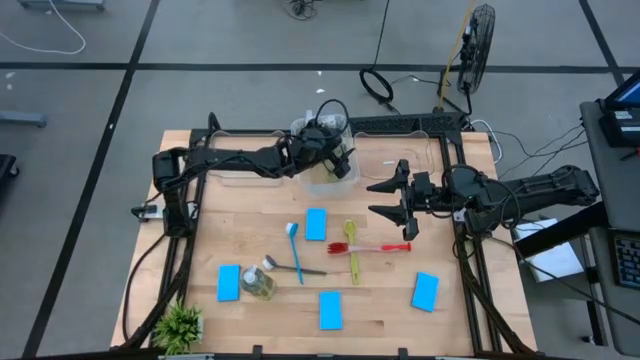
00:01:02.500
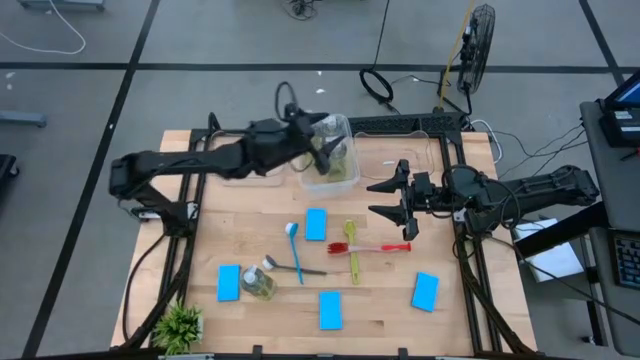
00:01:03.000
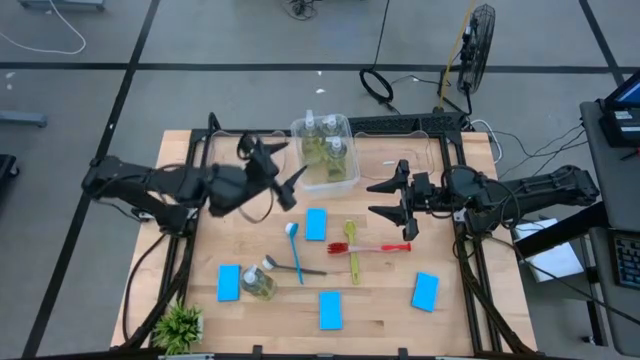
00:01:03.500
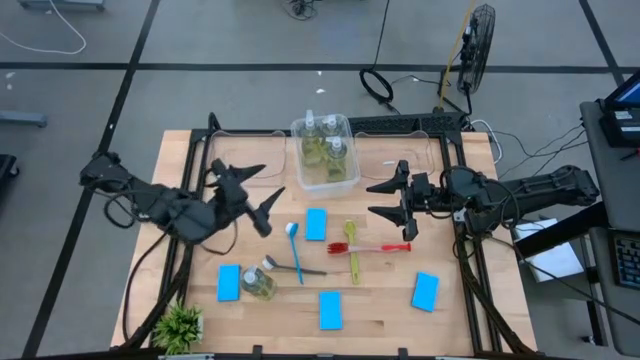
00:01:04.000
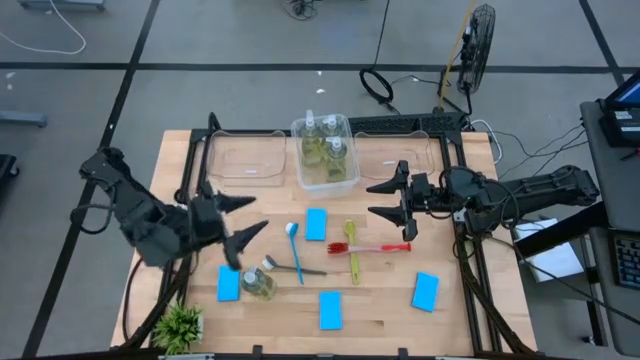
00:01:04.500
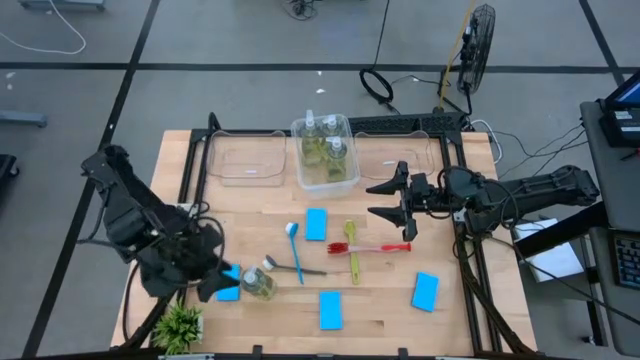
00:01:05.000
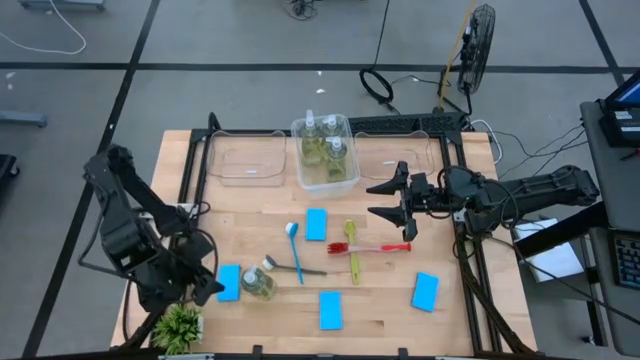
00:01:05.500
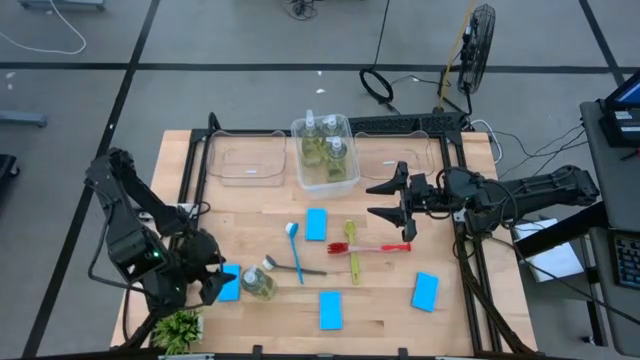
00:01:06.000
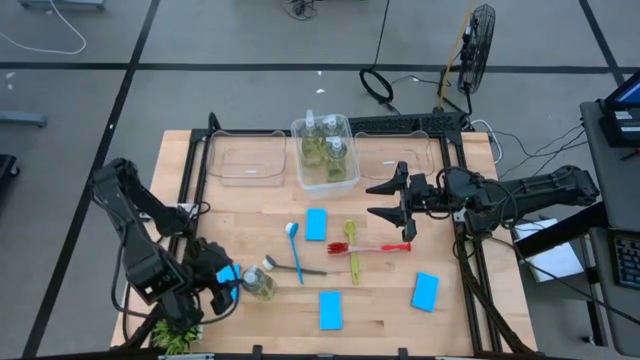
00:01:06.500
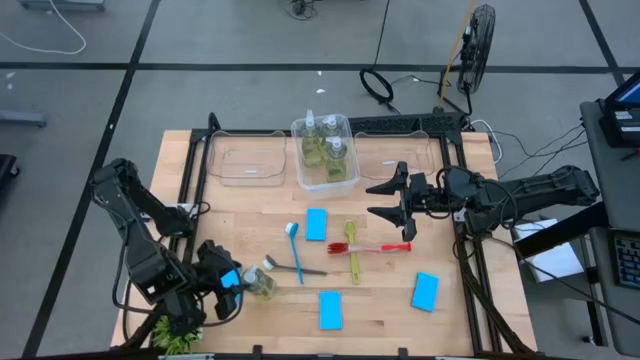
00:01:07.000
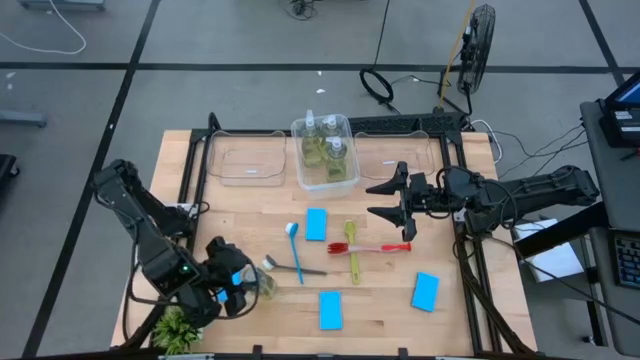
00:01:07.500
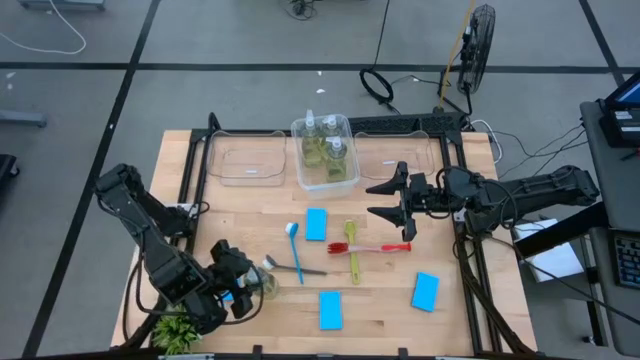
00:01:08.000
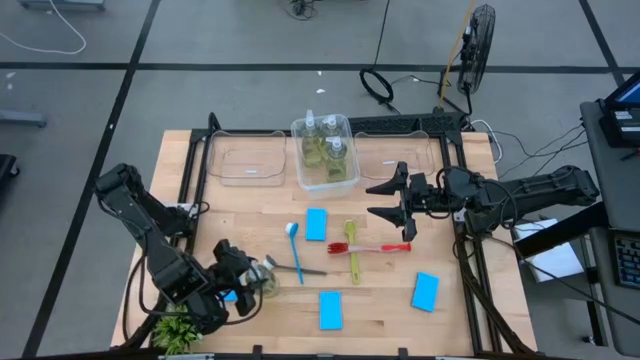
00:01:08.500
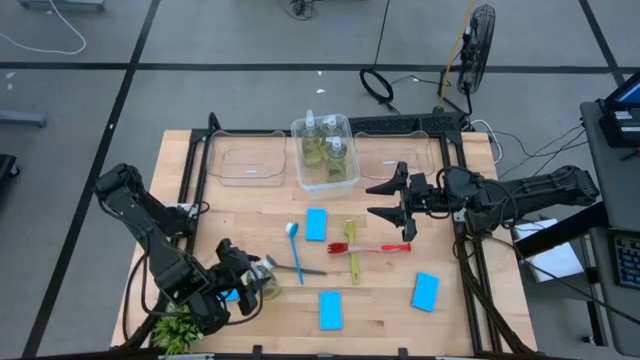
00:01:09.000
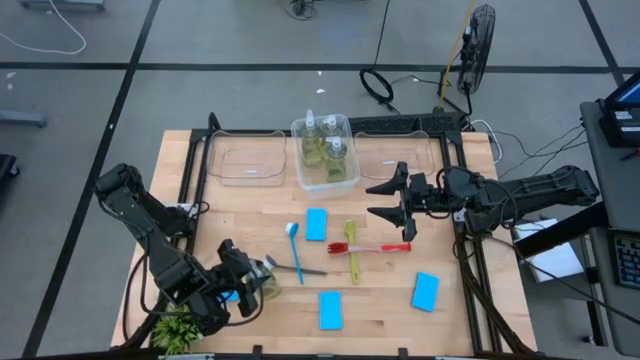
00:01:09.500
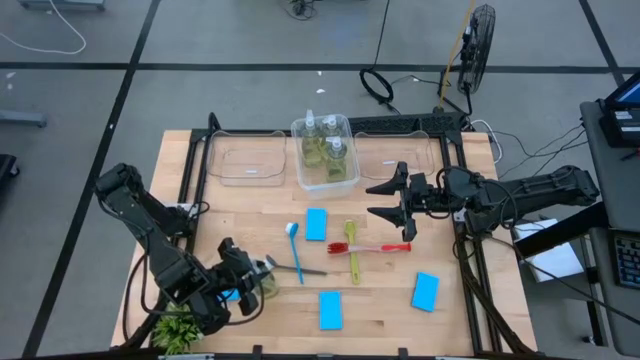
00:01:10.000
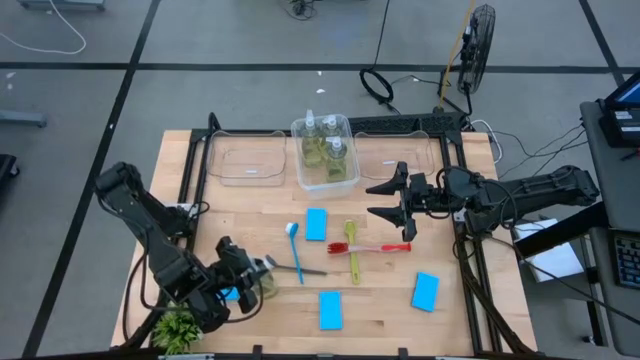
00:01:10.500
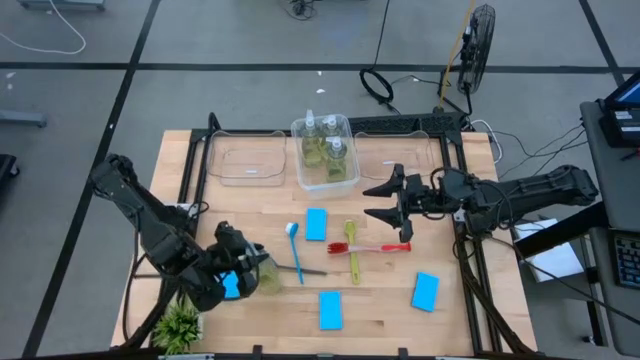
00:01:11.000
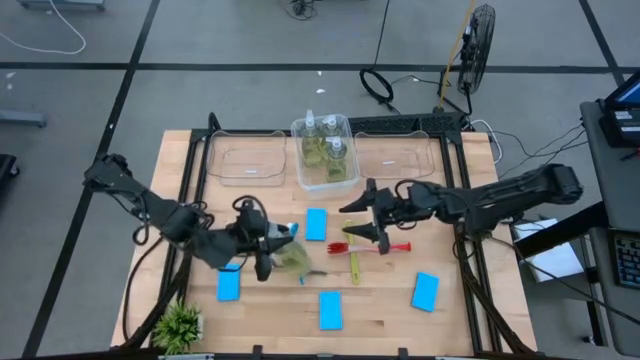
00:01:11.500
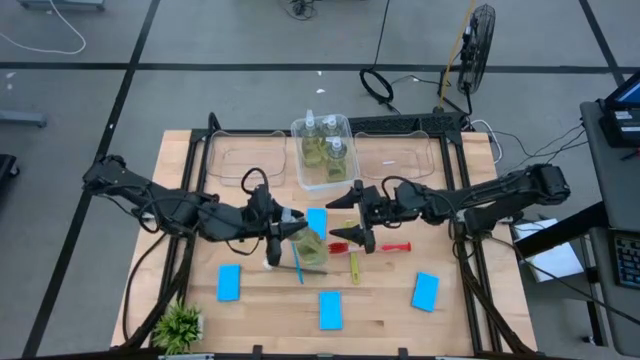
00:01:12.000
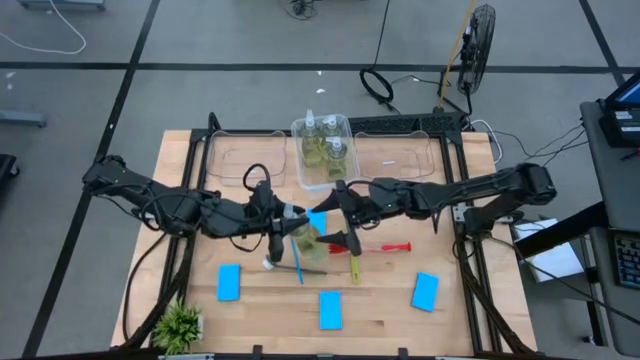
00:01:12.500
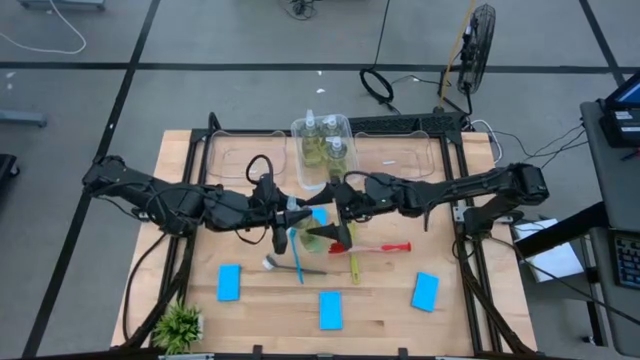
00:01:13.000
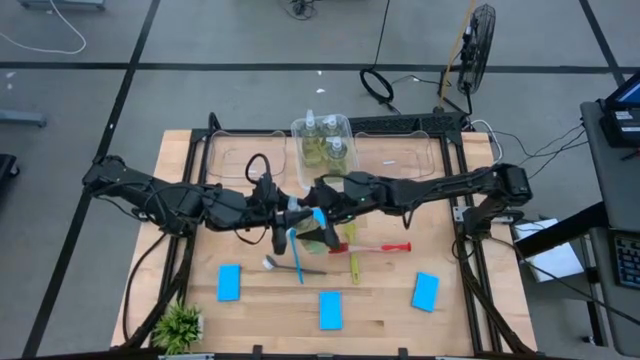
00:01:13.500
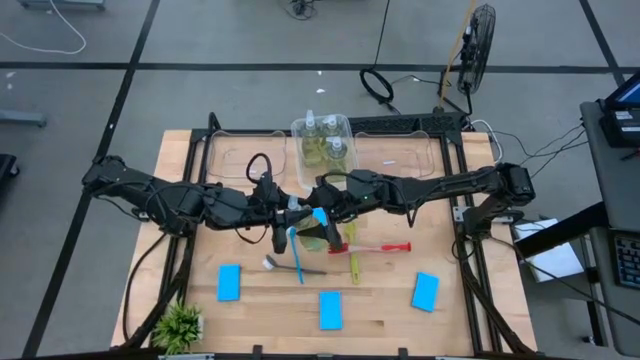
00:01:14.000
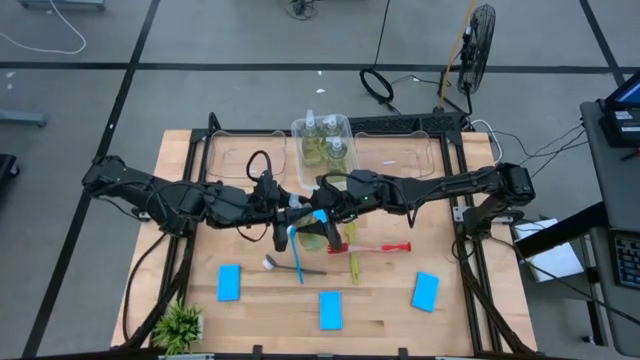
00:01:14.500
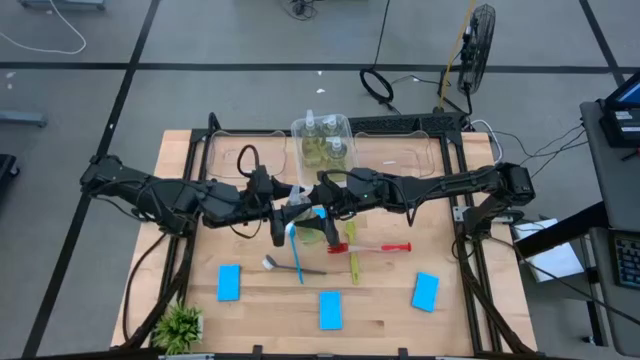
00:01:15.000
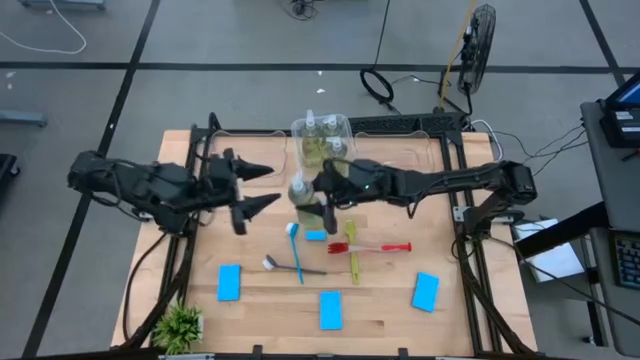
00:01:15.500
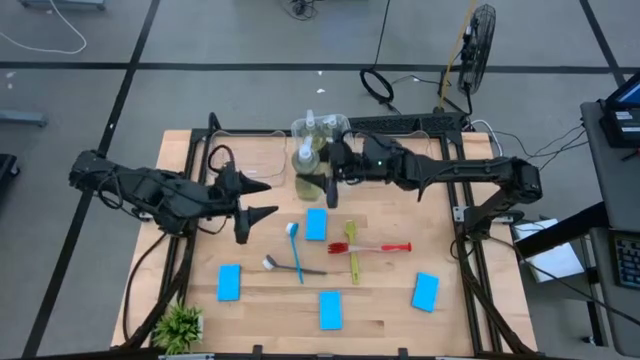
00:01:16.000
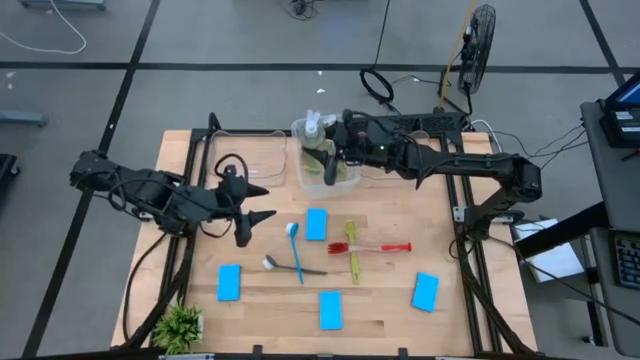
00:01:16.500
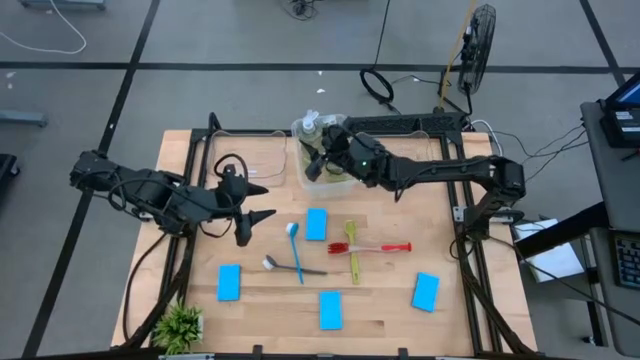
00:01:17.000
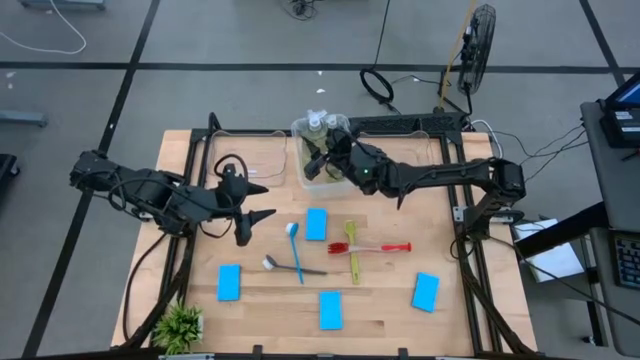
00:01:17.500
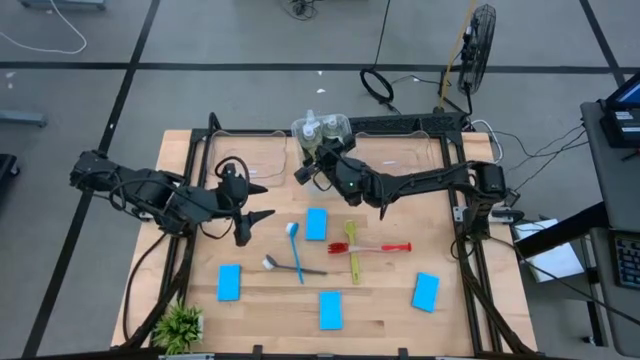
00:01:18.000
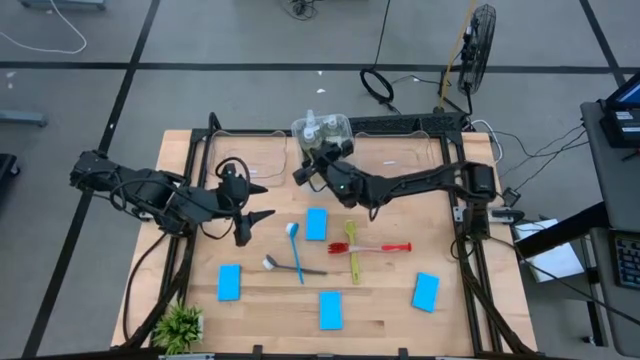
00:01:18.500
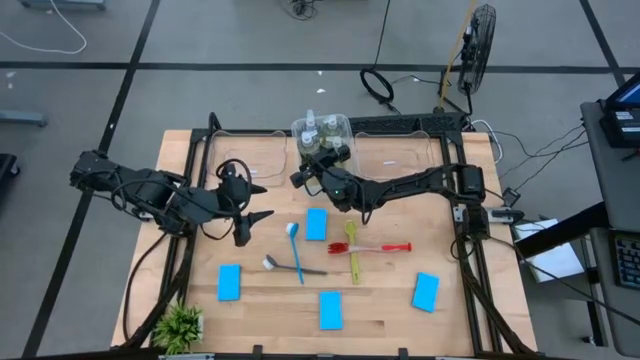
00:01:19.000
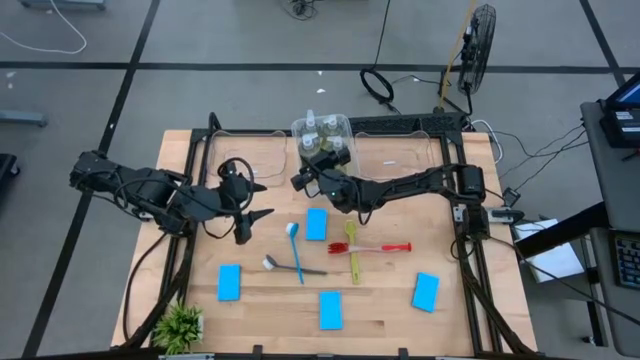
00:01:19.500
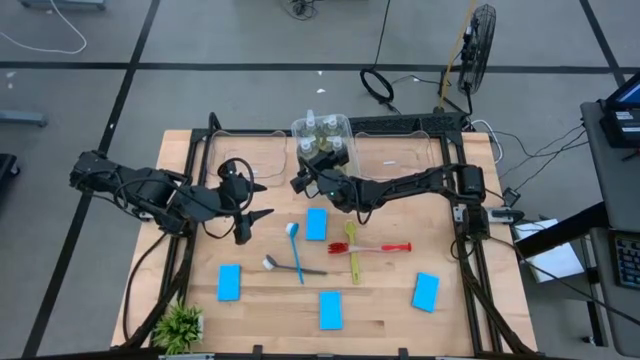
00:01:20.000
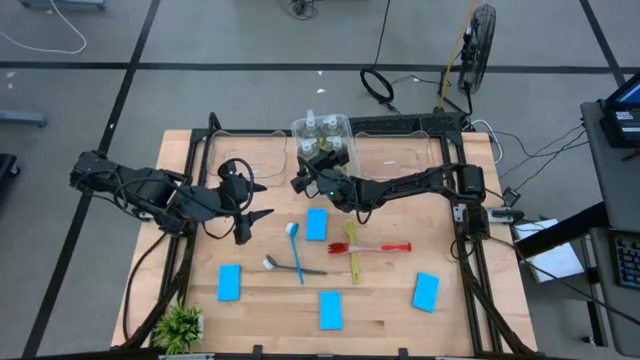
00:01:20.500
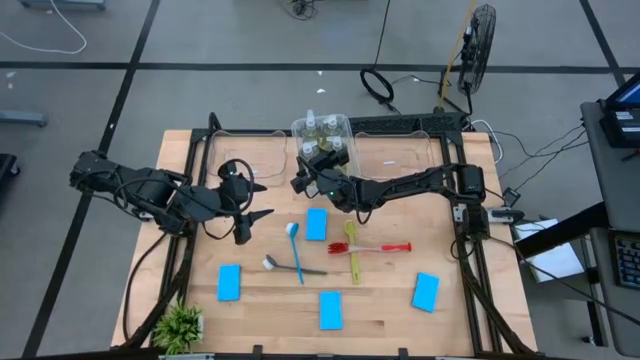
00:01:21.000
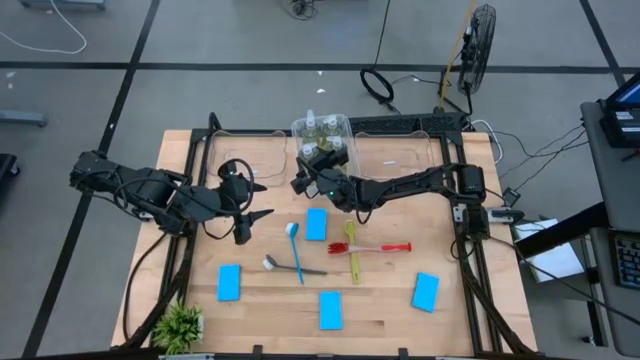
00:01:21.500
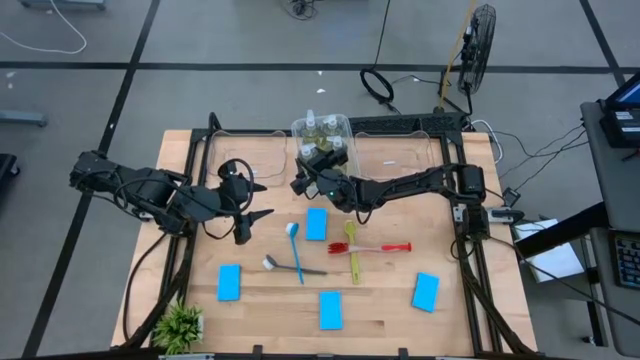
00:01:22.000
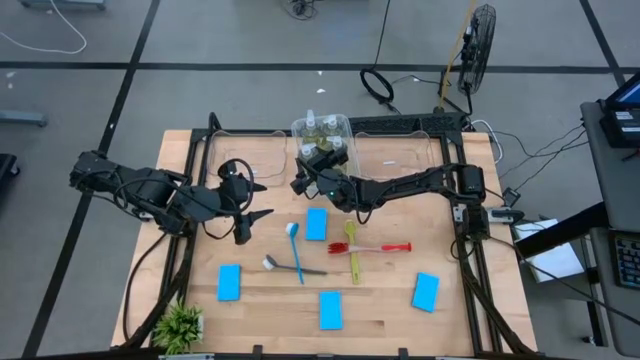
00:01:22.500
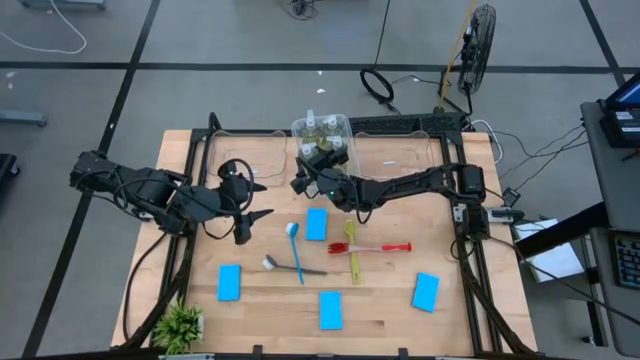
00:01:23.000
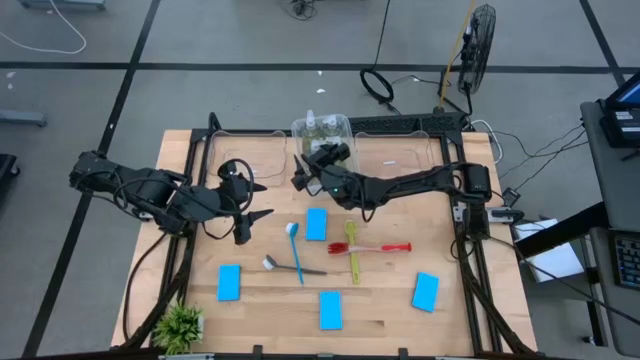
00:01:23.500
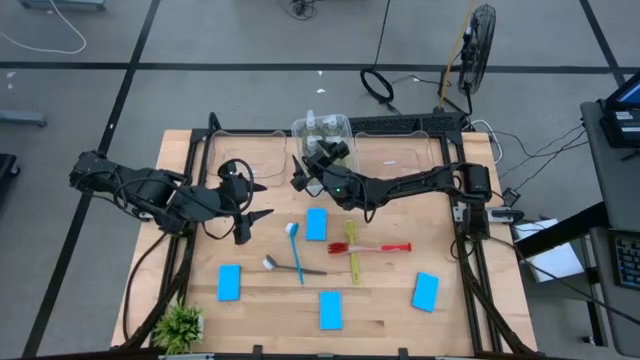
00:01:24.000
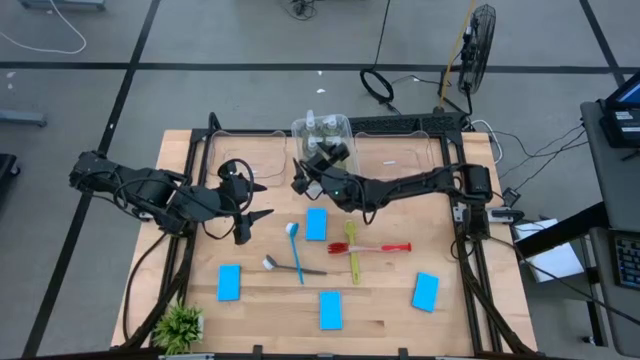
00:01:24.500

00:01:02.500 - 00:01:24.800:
Task: Pick & Place Kitchen Sink Supplies
Put the yellow dish soap into the white bin
